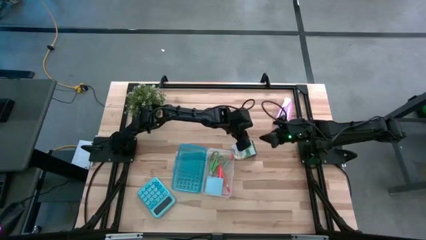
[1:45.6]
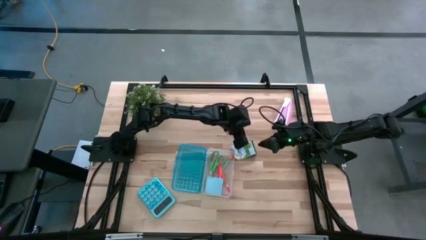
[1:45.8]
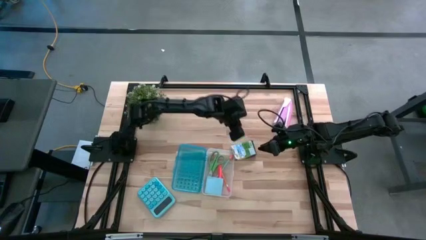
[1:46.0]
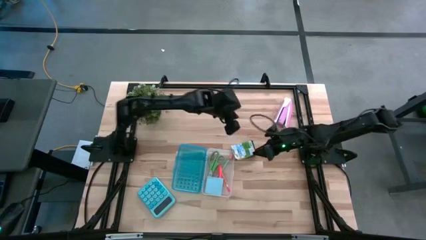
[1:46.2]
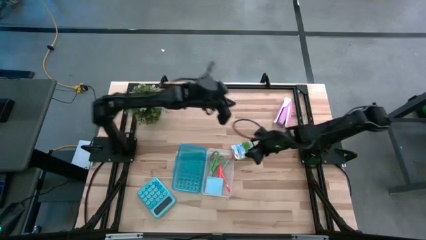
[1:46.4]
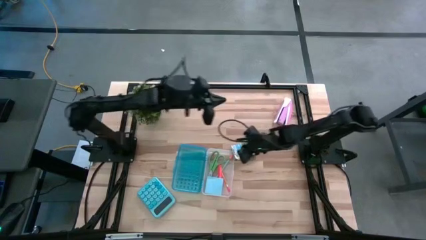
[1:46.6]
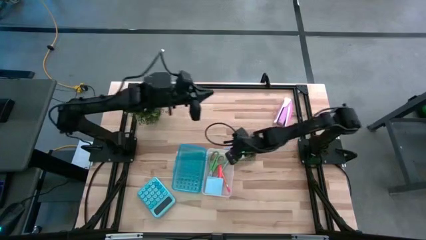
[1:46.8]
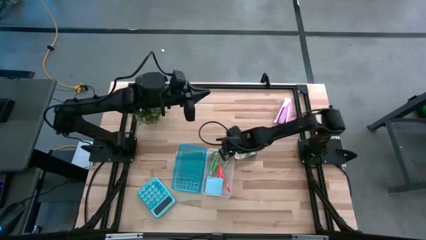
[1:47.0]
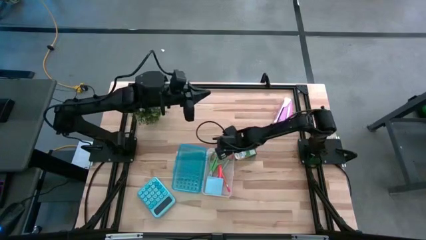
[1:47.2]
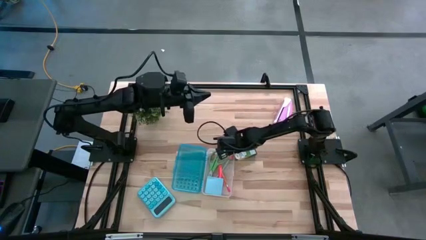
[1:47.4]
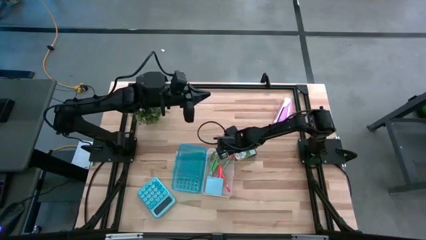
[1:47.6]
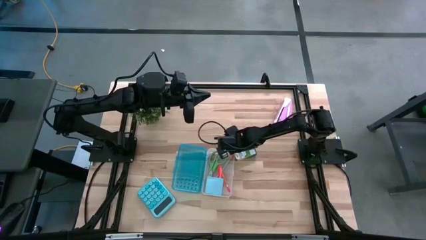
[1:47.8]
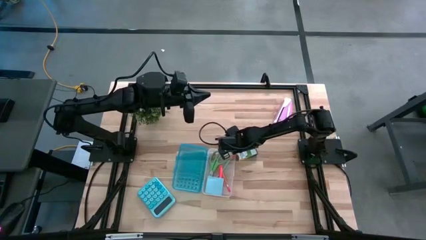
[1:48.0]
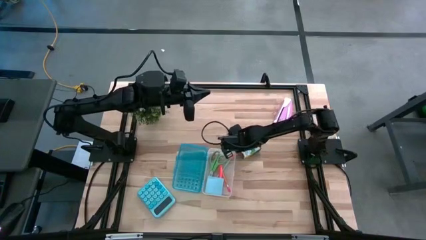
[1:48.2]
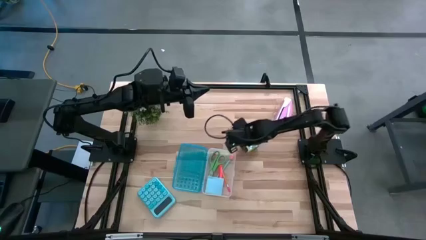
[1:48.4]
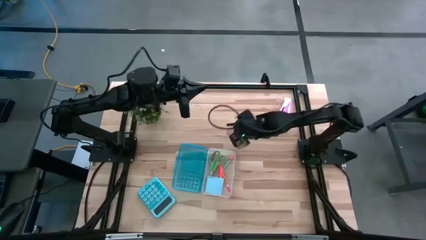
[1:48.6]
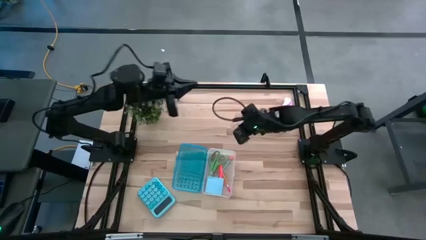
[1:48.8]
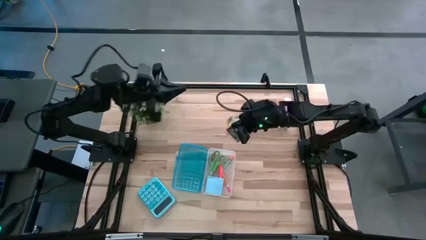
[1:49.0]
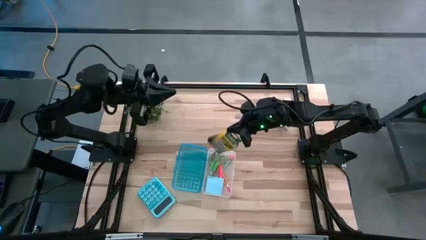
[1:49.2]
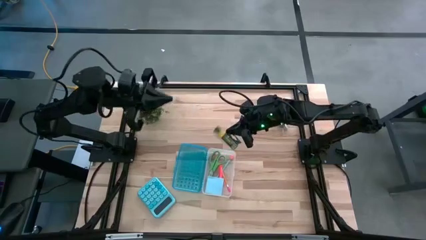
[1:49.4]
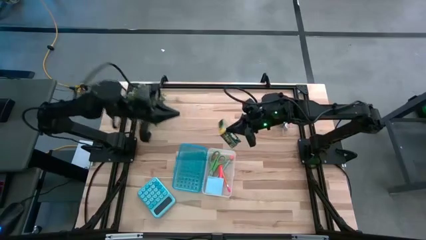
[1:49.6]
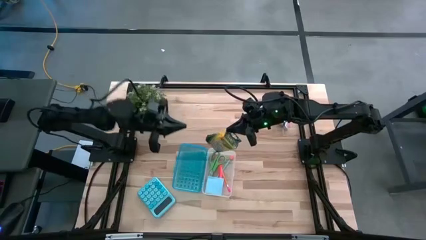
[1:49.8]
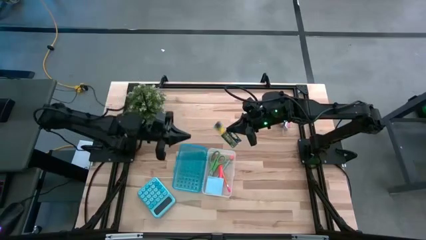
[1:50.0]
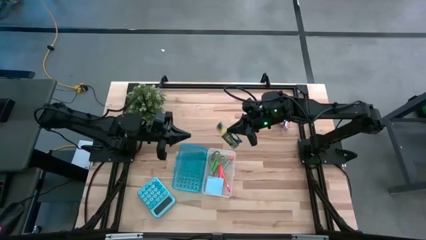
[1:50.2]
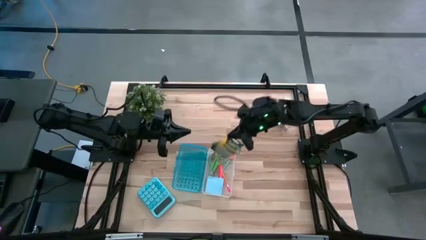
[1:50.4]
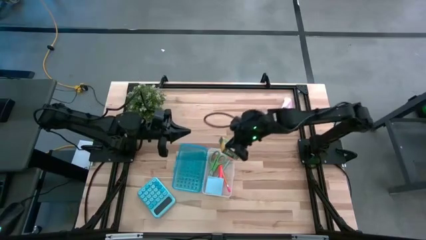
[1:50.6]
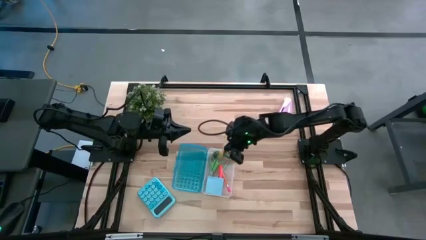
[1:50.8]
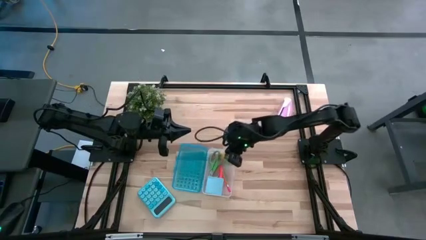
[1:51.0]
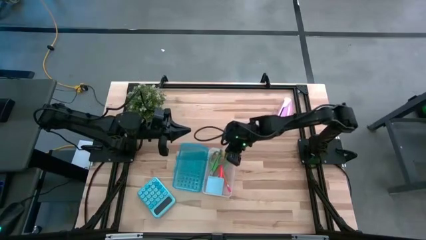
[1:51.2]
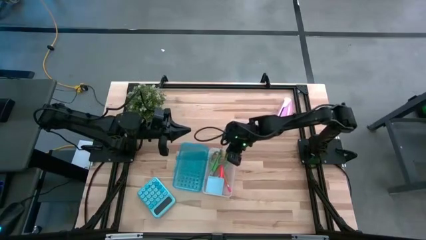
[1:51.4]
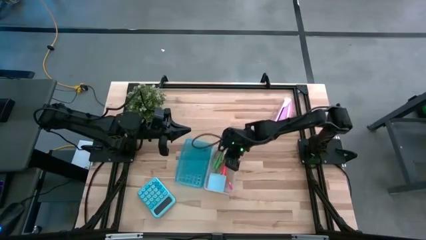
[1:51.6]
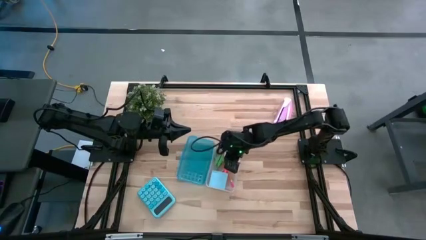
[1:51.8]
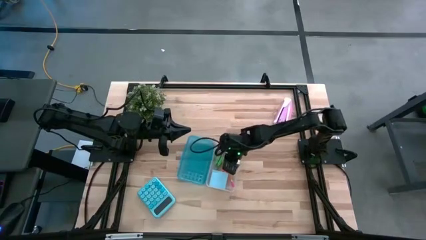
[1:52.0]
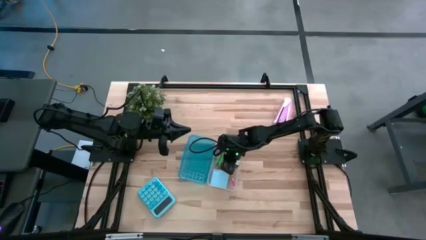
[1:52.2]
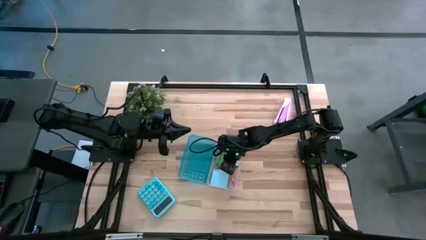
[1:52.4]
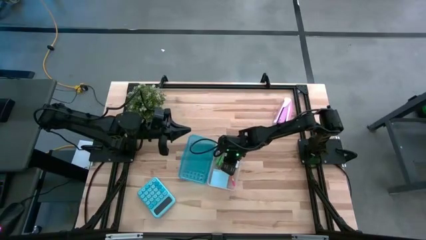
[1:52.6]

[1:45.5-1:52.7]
Task: Pack school essentials
Put the yellow crayon box into the blue supply box

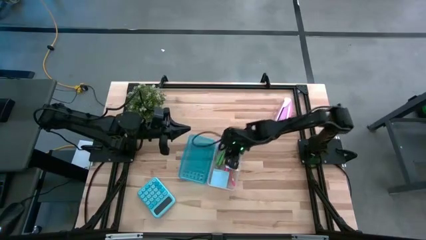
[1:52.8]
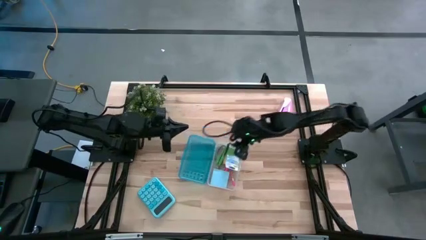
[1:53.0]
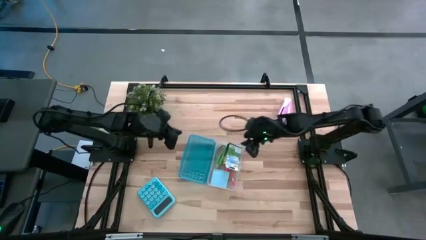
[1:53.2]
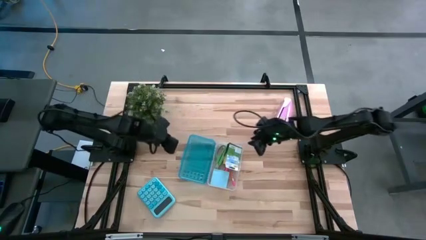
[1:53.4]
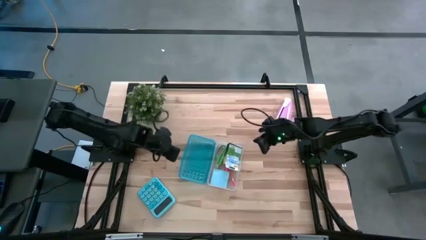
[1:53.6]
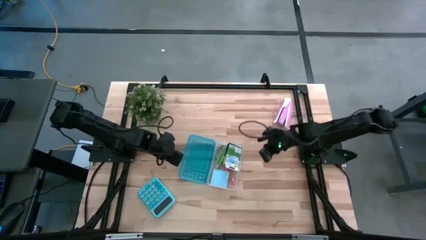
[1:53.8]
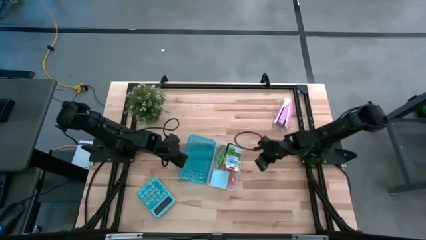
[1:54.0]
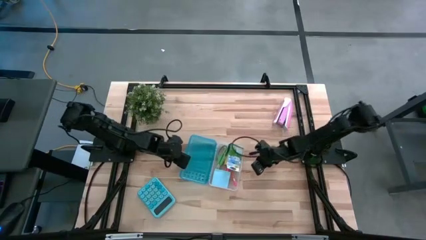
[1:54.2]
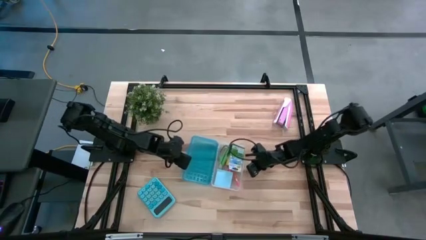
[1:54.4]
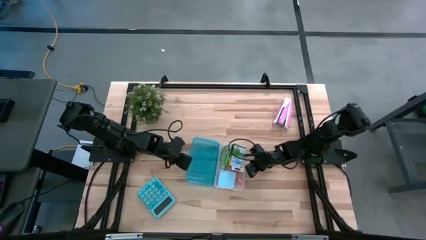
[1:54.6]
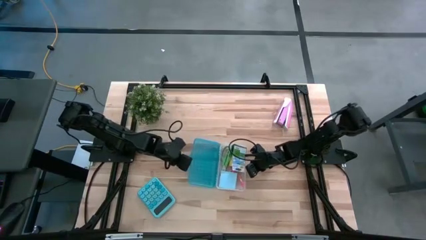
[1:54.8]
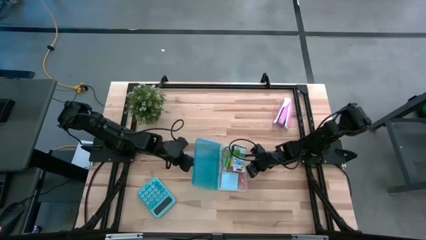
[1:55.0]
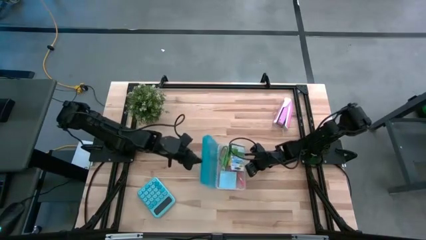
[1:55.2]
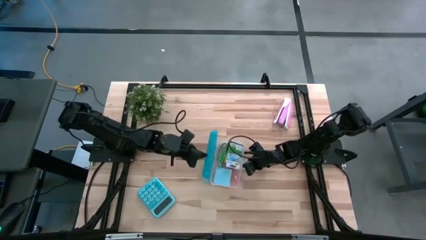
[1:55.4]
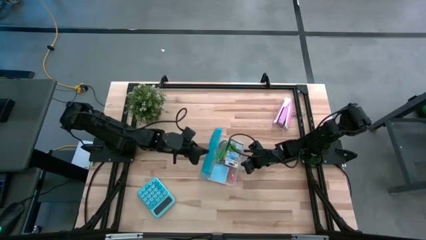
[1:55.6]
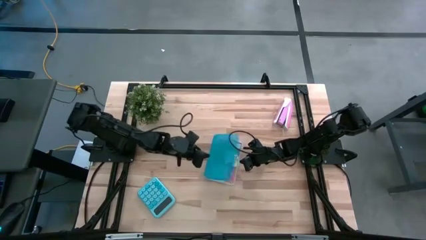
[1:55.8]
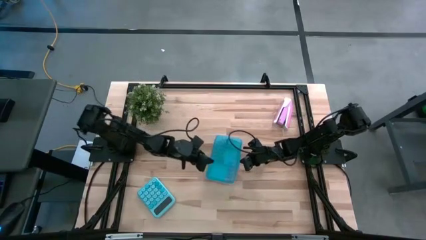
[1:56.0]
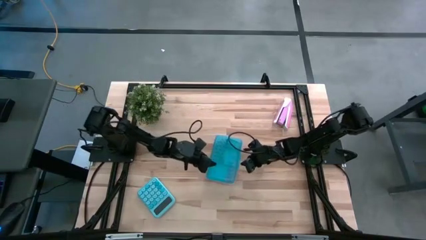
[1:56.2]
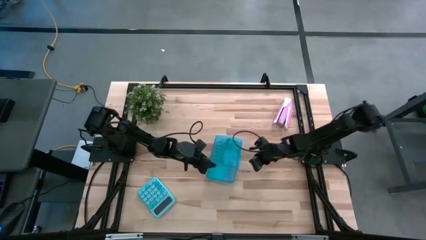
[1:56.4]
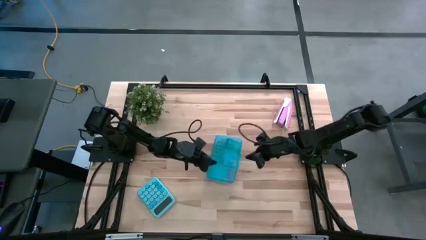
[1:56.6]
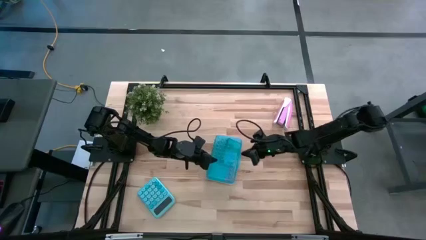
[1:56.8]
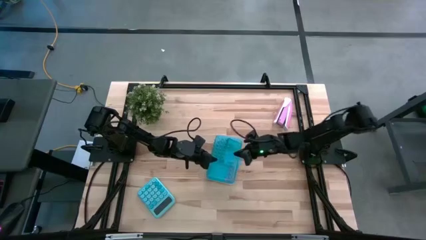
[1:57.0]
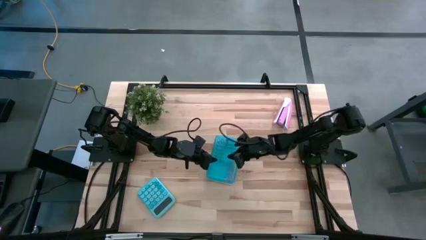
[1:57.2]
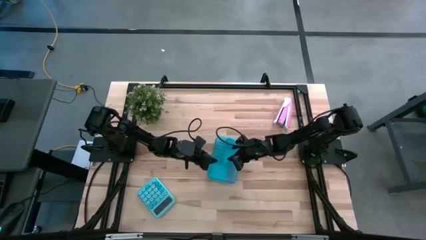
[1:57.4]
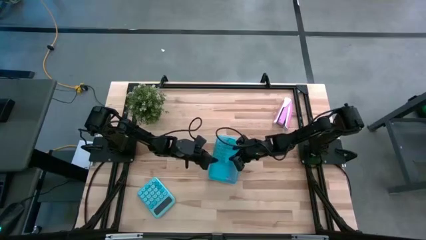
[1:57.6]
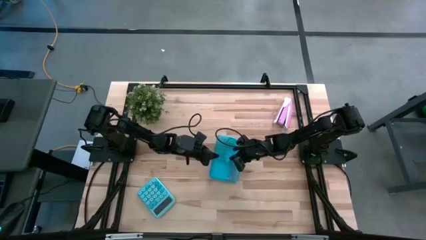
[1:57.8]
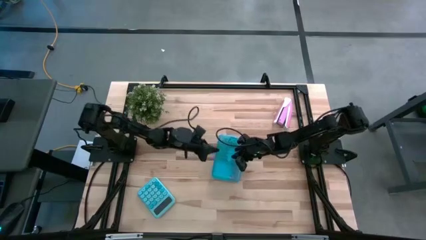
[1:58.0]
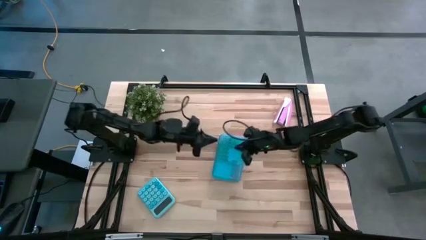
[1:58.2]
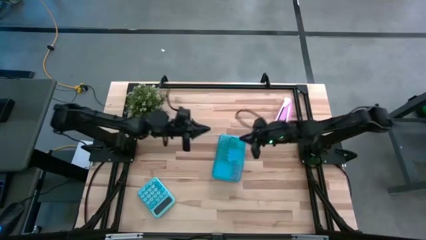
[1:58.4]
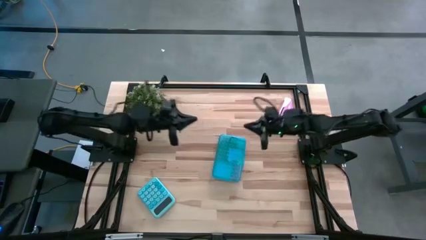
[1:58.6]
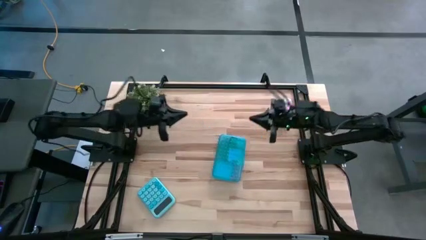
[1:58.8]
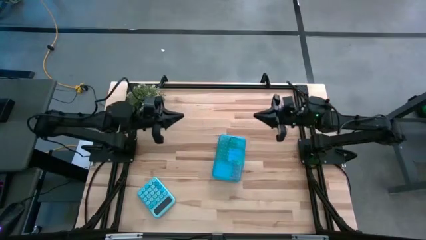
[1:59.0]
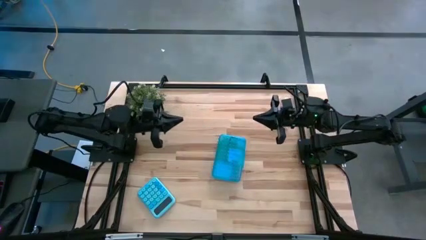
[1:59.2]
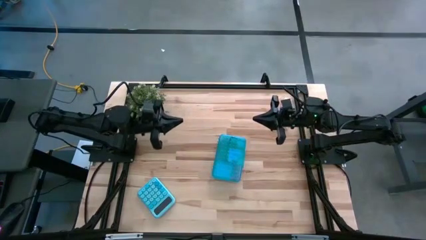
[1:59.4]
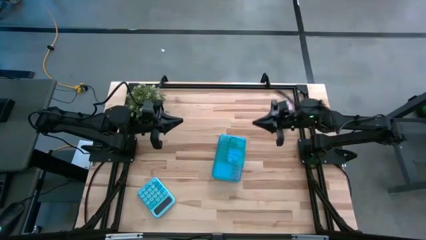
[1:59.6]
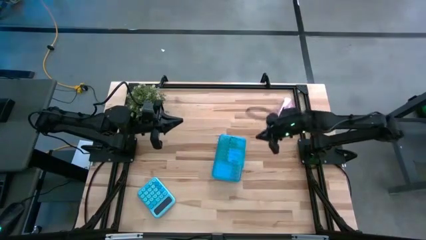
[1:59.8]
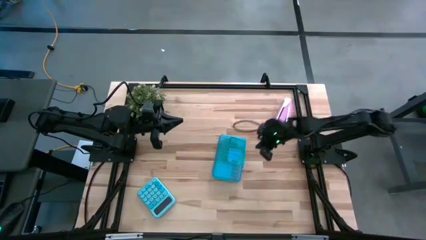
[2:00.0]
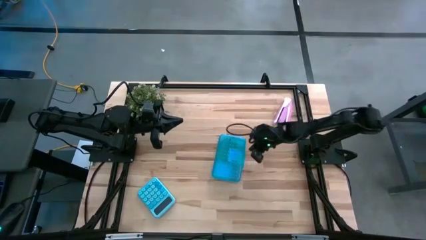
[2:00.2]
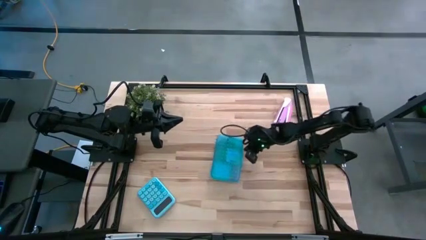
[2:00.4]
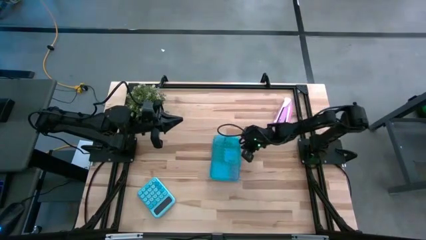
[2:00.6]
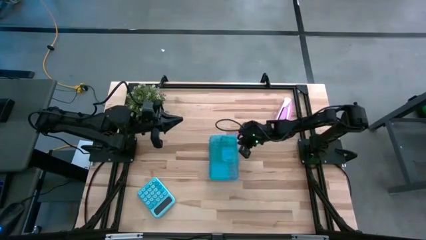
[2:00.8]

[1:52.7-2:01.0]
Close the blue supply box

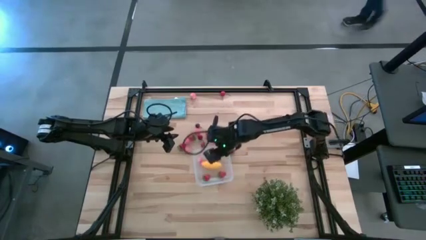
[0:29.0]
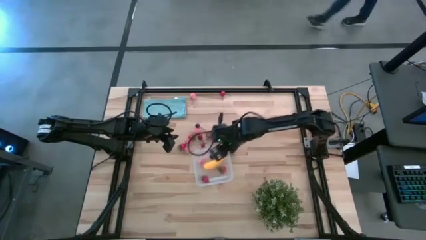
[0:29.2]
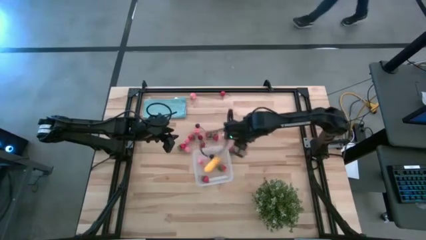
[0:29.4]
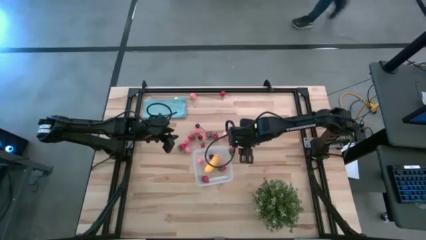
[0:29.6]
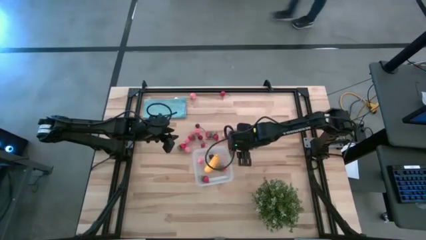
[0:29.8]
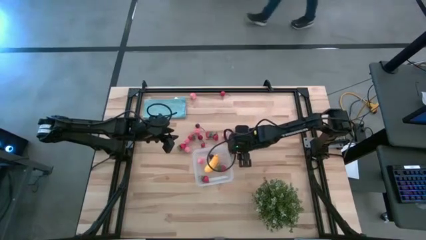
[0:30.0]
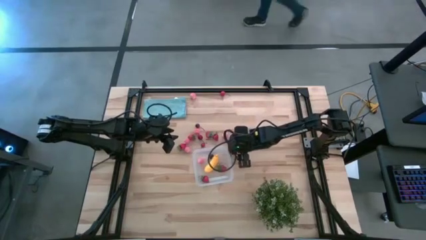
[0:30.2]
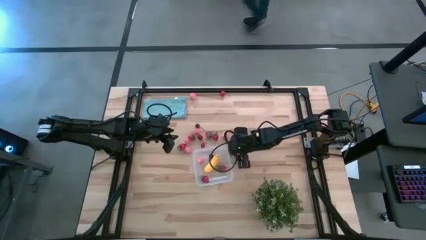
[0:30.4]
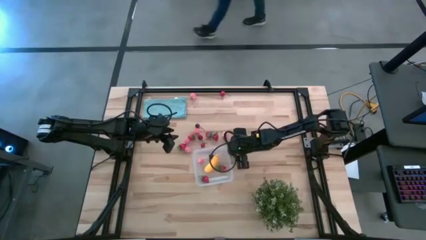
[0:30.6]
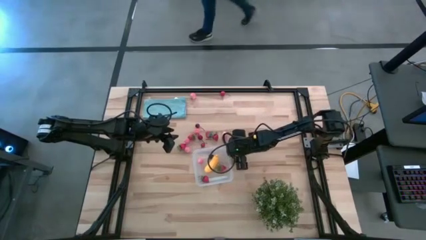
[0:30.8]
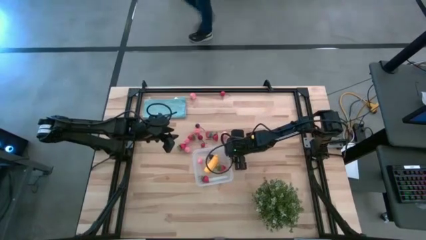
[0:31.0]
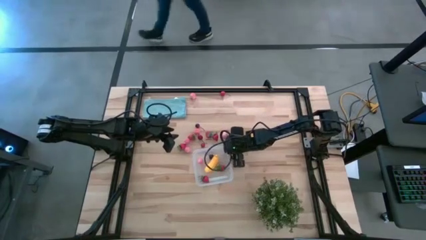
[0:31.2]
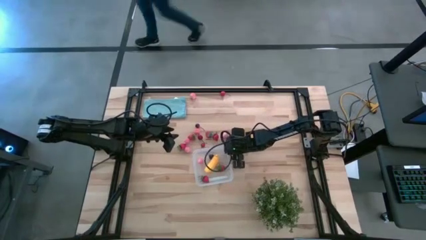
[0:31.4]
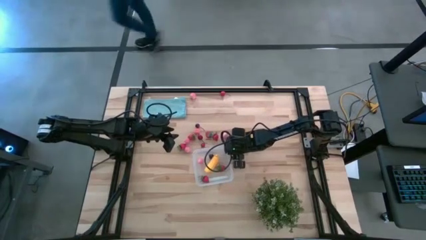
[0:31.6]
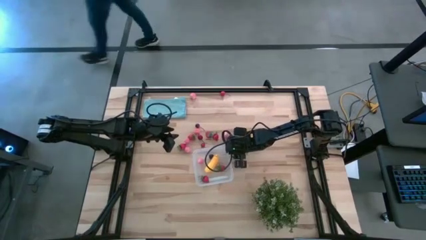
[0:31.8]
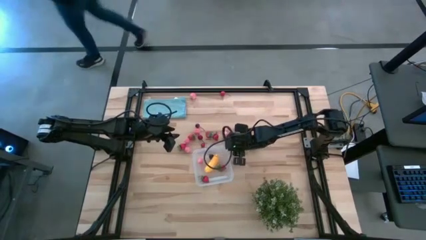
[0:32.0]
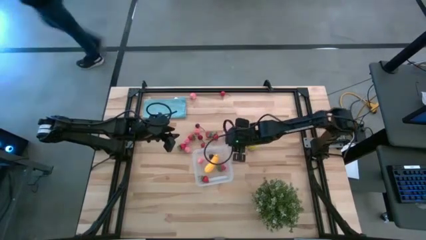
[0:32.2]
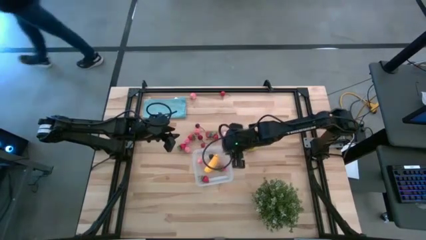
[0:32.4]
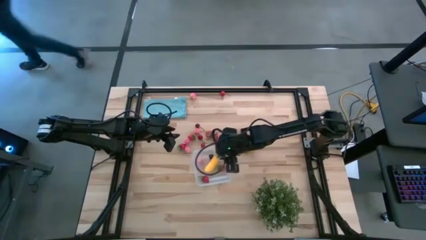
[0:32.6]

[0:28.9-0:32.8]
Task: Pick and placing Produce into tupperware
Put the red strawberry into the transparent bin
